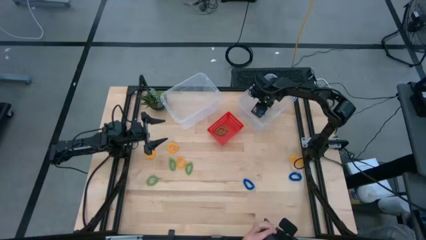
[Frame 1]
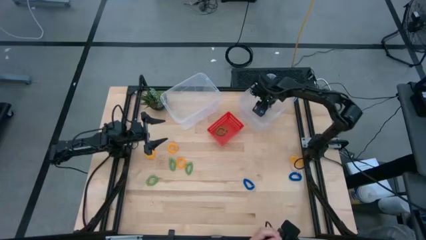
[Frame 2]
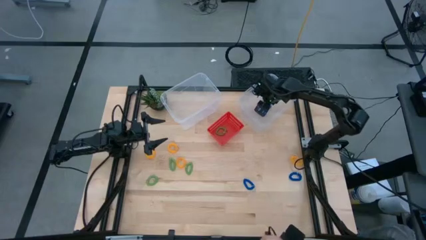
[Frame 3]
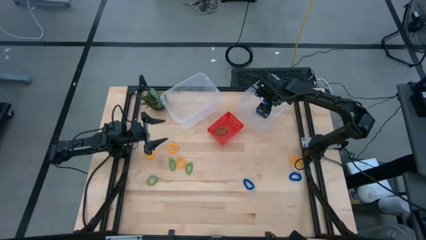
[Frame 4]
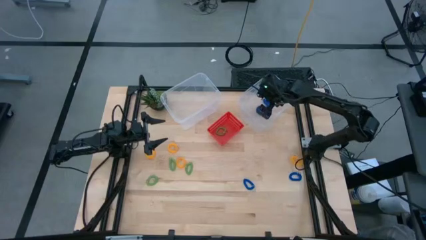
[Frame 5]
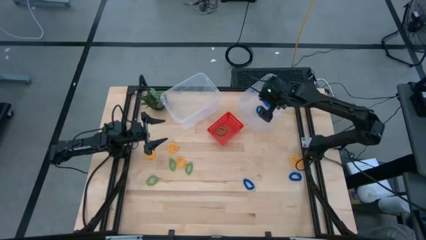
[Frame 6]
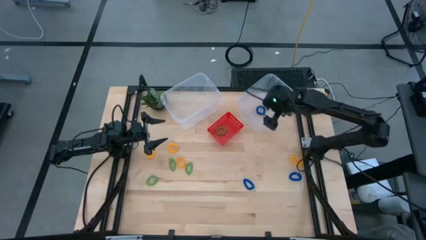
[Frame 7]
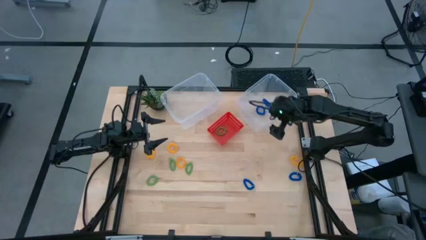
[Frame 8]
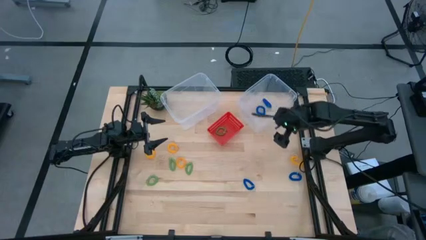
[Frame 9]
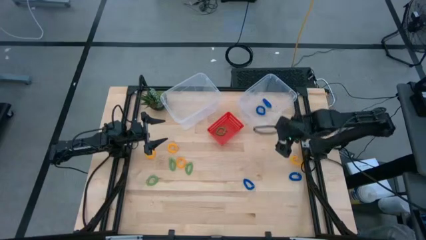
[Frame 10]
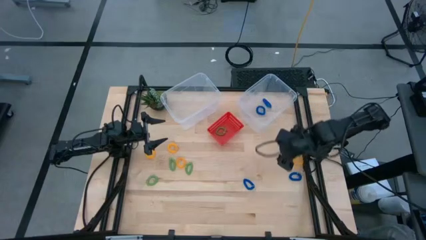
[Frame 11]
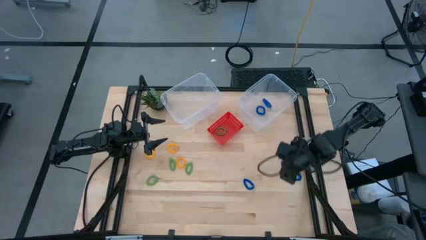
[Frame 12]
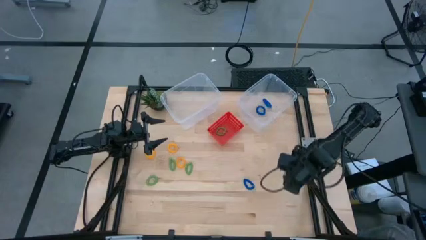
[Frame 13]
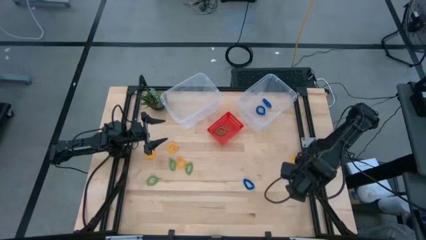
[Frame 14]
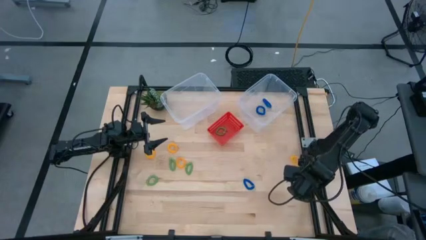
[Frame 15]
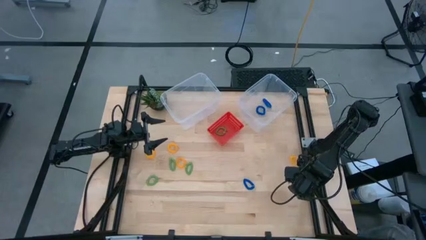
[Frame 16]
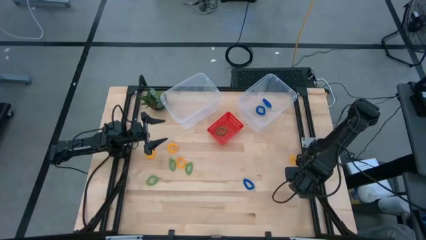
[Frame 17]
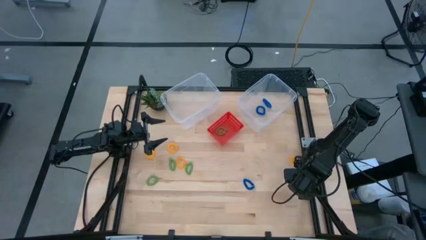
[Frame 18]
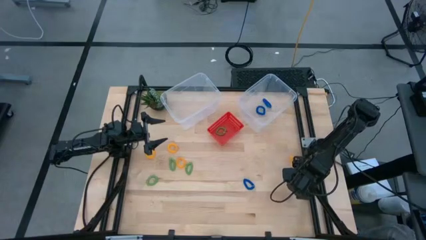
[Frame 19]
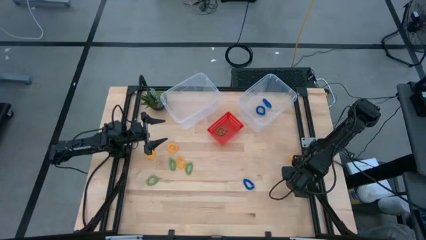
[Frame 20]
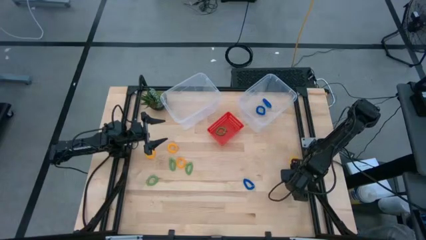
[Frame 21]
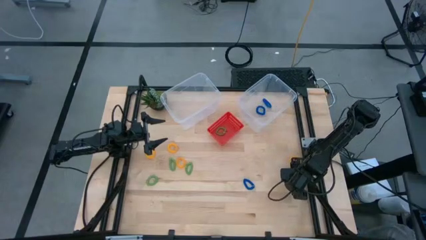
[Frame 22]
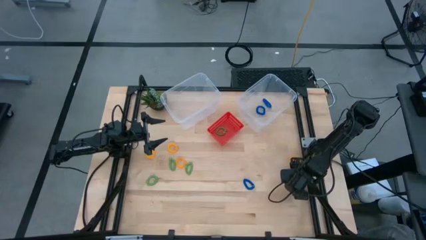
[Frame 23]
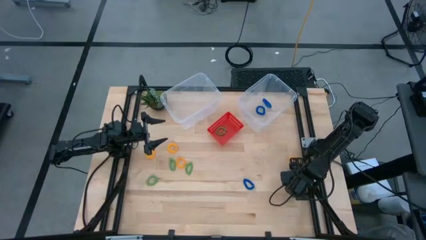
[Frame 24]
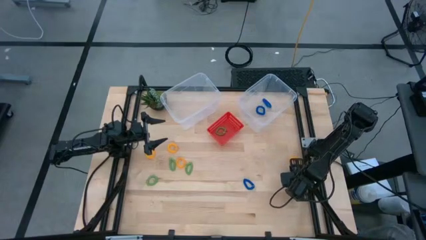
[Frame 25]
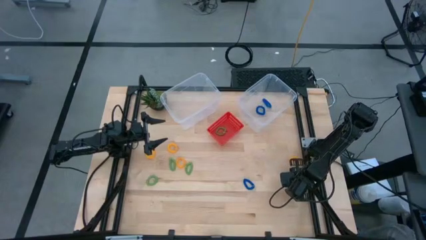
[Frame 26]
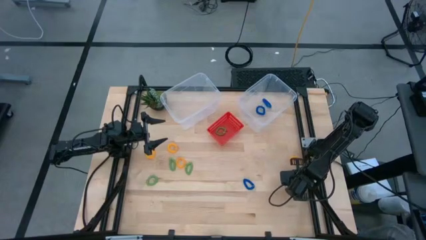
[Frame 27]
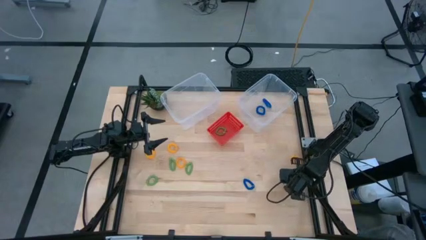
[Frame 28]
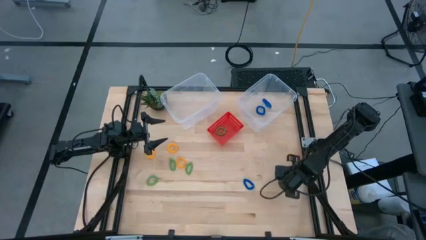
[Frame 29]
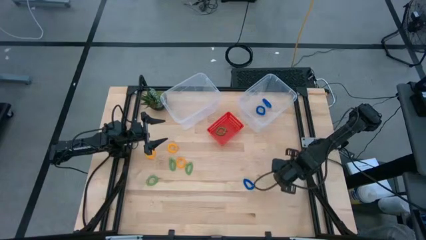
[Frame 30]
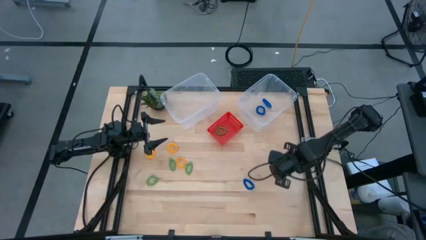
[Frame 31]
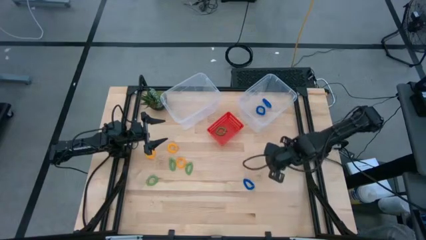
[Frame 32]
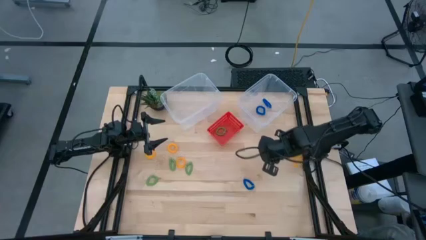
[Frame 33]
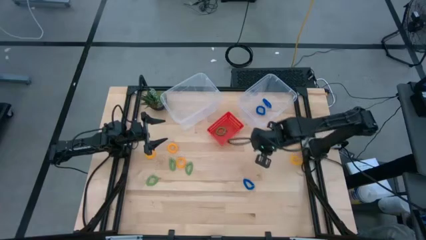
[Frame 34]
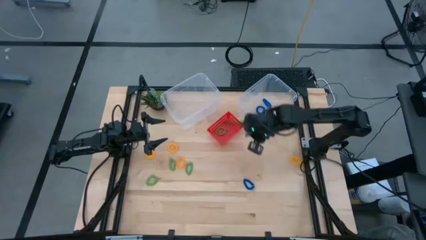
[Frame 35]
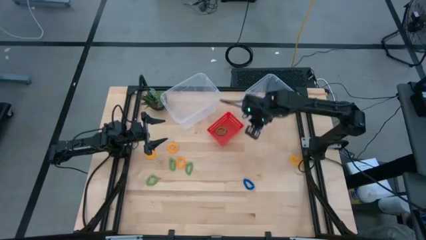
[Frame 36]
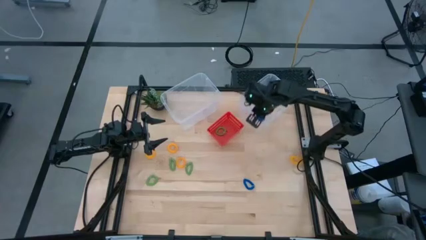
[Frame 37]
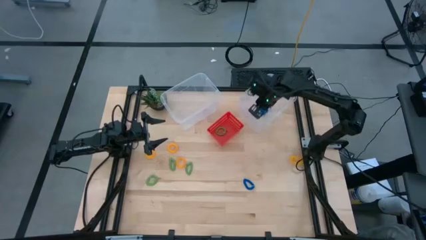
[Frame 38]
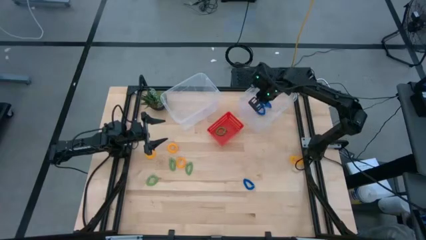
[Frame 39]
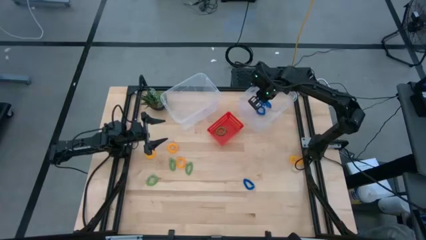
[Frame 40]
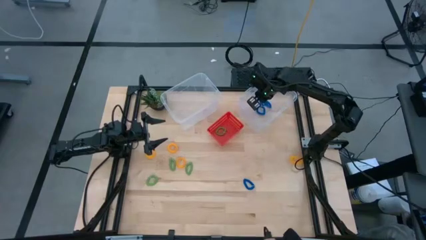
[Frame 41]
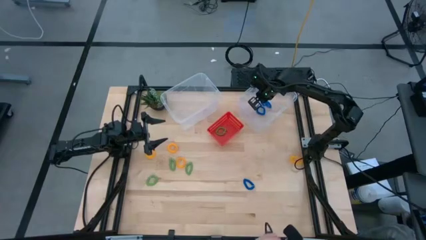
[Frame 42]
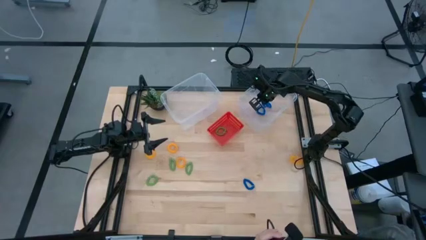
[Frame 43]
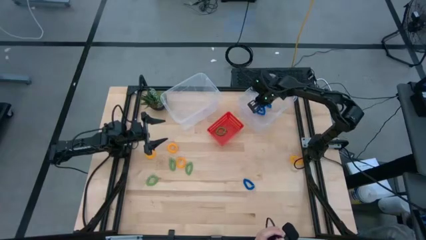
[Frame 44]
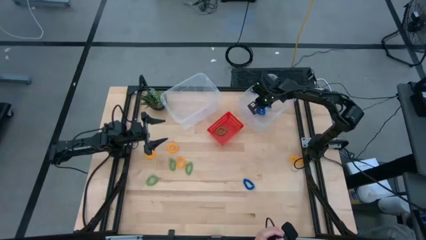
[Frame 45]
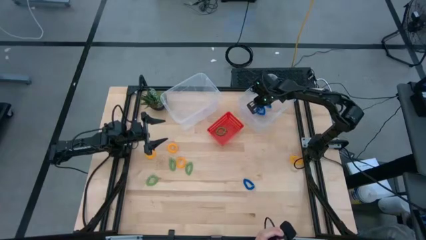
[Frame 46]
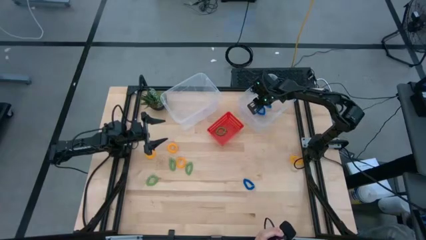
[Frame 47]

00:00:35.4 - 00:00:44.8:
Task: Sort spring keychains
Put the blue spring keychain into the right transparent bin

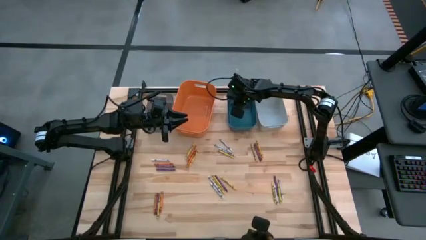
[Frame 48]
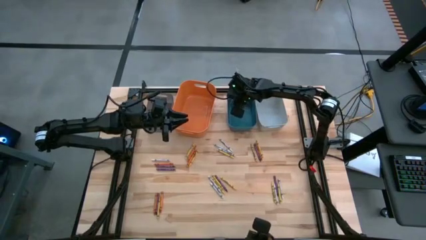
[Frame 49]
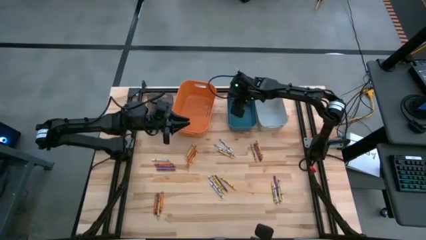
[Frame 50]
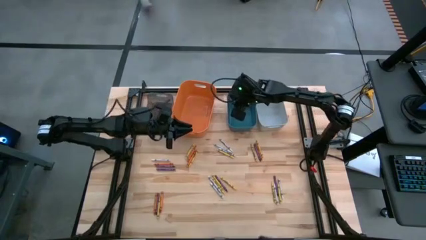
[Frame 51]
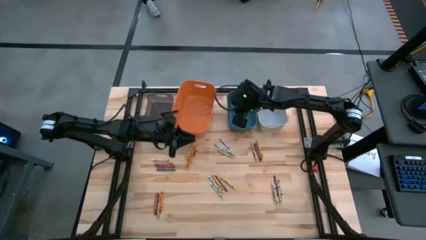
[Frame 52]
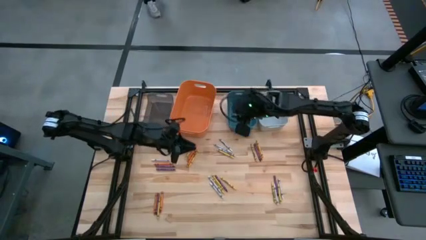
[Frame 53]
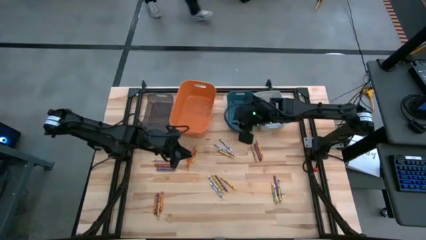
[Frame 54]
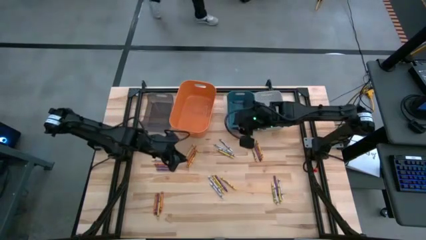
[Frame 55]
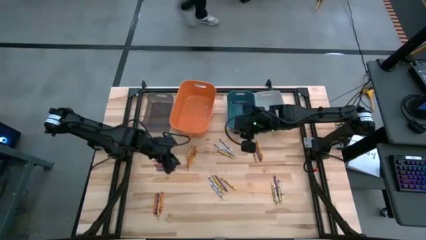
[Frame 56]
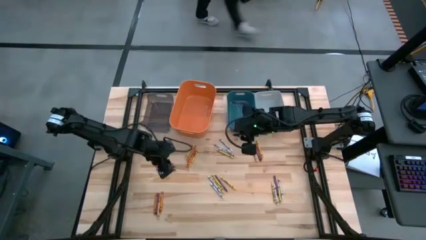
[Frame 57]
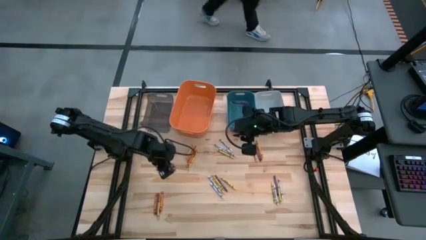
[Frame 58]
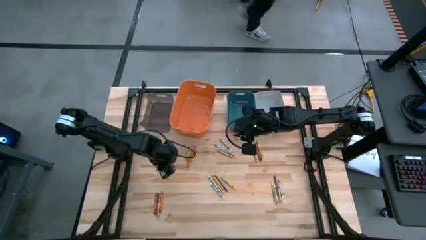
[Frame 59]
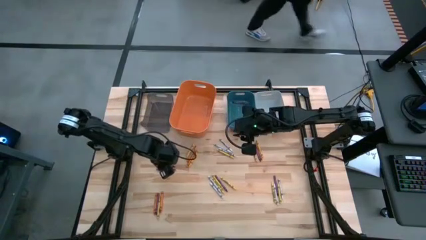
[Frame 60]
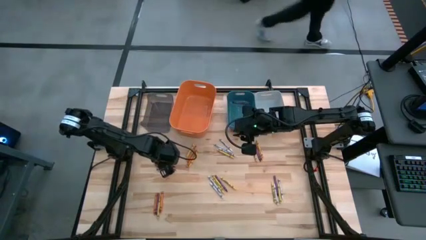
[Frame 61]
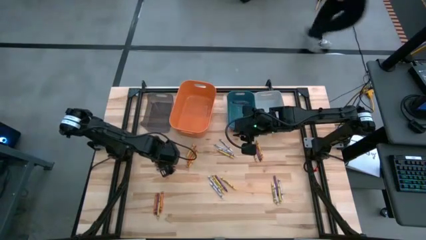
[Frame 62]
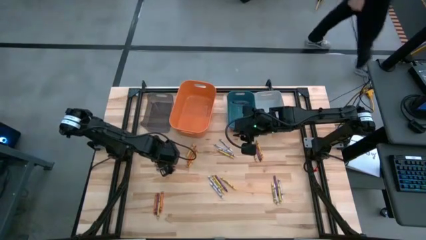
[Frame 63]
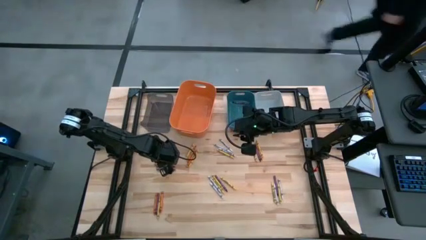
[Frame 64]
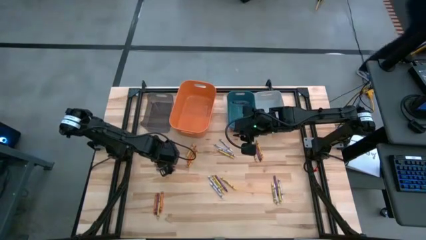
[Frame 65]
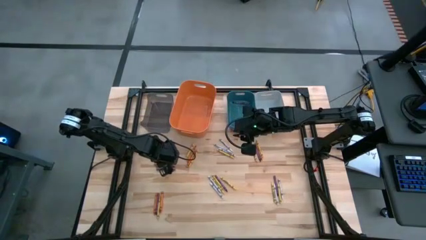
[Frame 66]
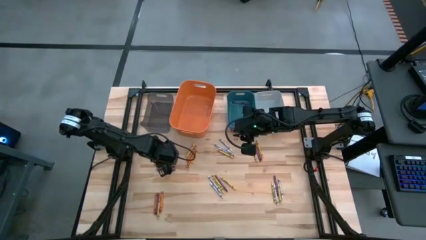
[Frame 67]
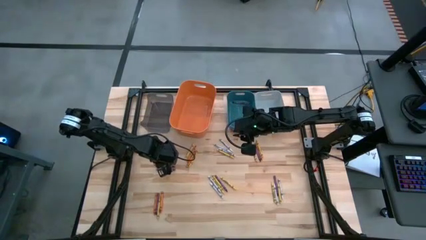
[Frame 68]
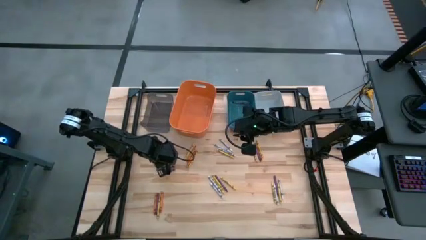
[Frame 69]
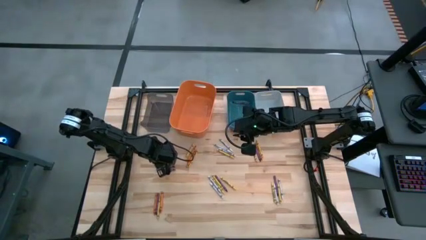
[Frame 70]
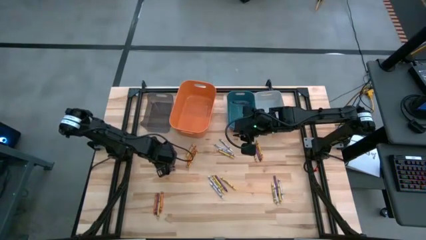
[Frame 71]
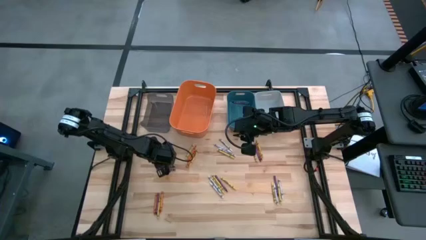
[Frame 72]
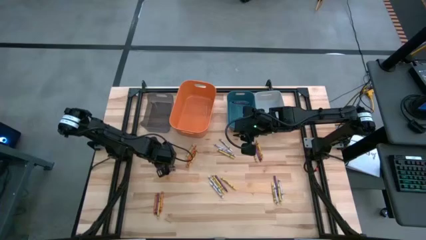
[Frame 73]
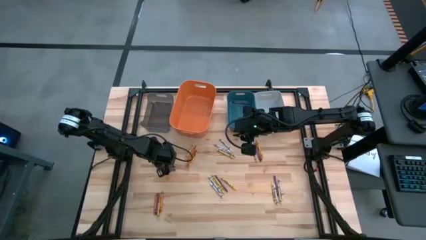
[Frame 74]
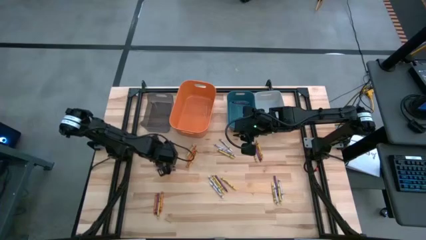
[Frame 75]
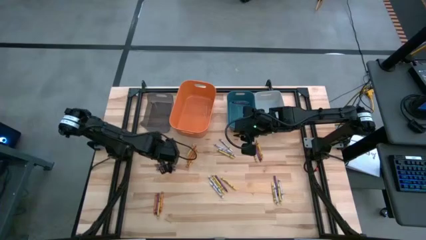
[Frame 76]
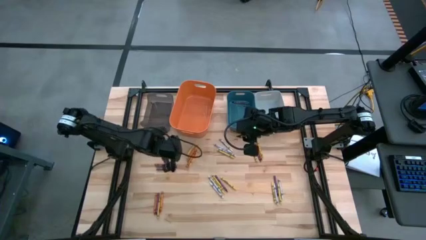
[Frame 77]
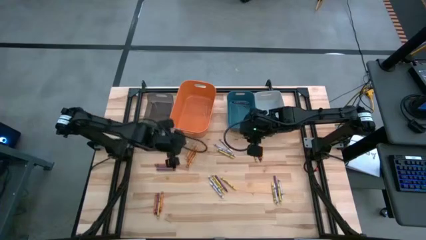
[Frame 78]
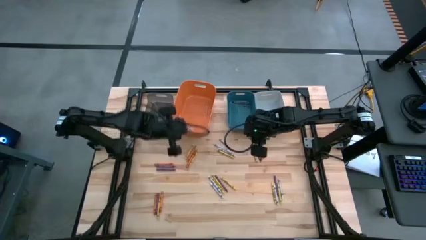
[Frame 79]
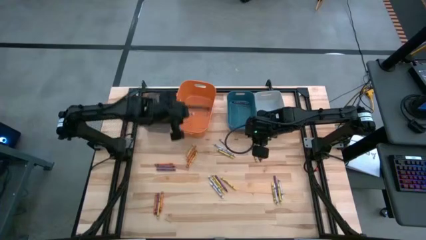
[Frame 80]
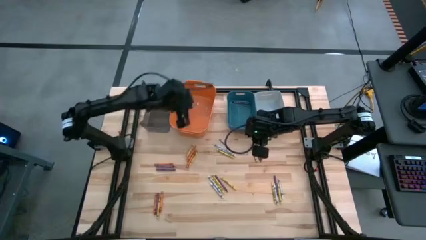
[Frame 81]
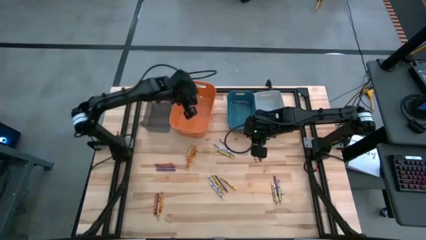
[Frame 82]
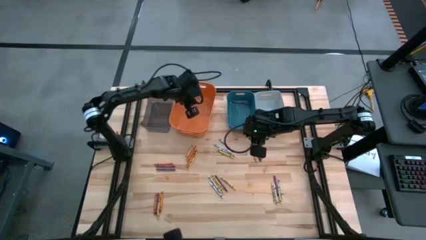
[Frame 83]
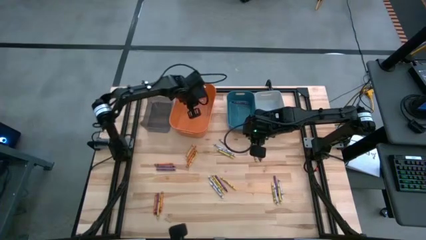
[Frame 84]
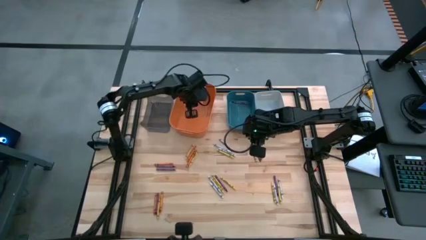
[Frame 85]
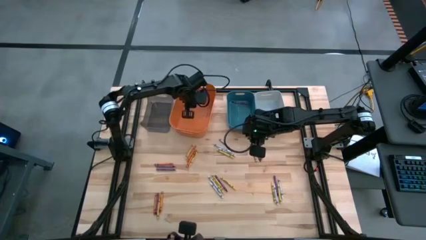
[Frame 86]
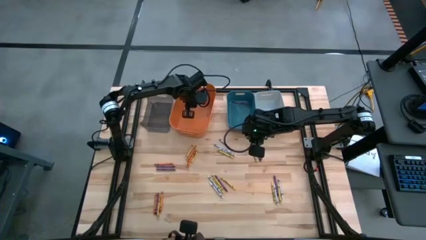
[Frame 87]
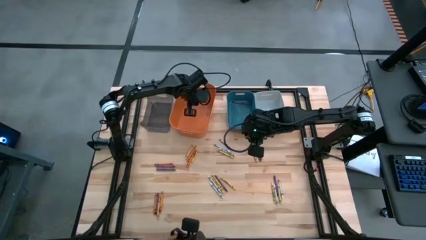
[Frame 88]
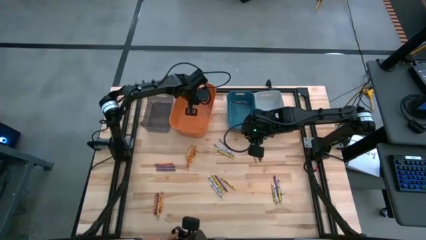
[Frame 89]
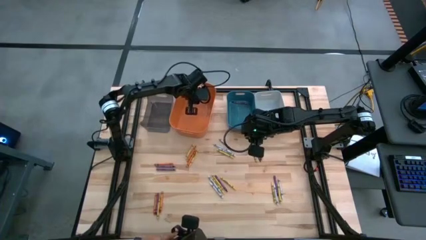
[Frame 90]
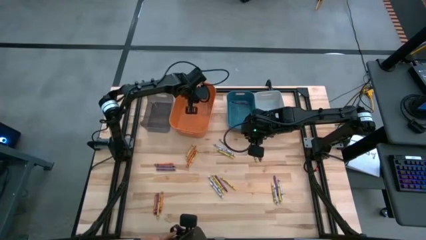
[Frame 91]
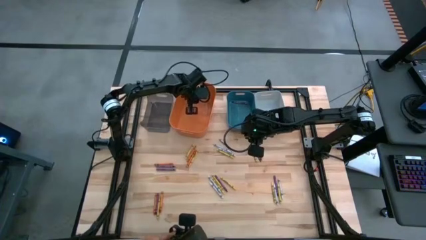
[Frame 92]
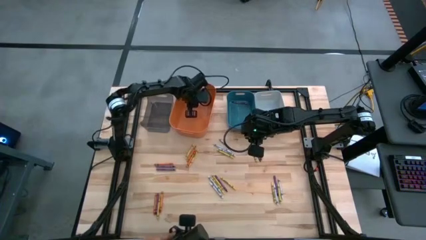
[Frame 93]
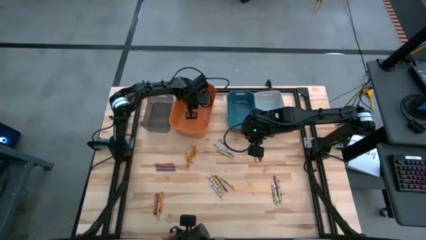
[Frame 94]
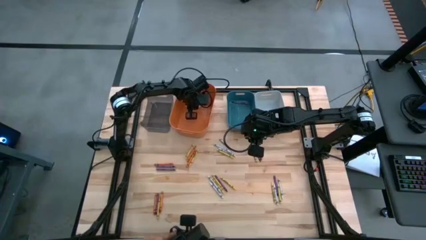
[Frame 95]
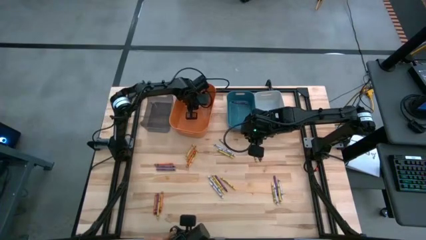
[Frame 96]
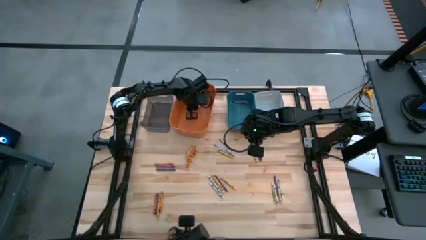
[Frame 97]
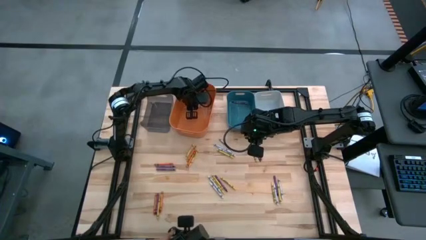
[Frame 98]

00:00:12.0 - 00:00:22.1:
Task: Sort crayons
Put the white crayon into the orange bin
